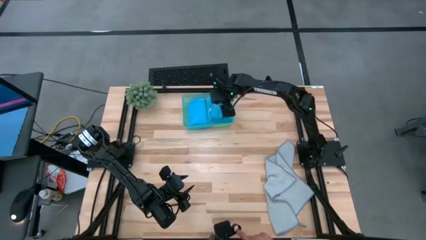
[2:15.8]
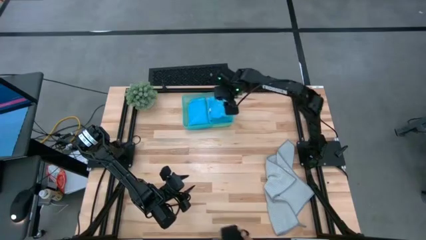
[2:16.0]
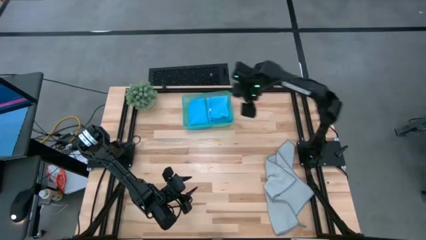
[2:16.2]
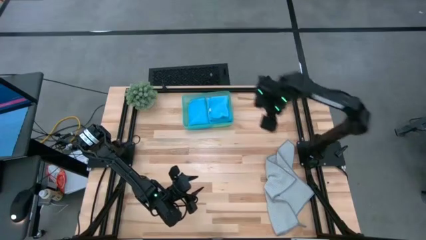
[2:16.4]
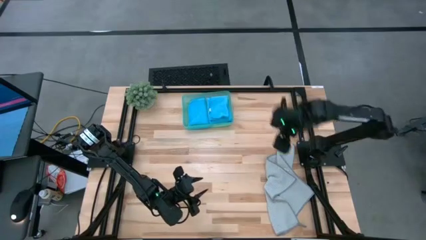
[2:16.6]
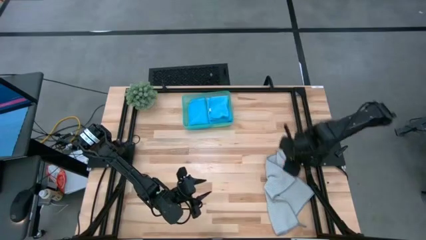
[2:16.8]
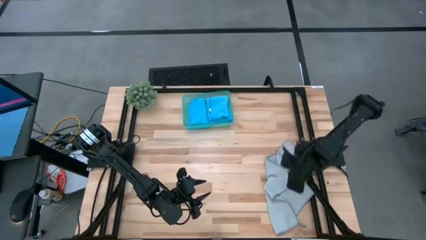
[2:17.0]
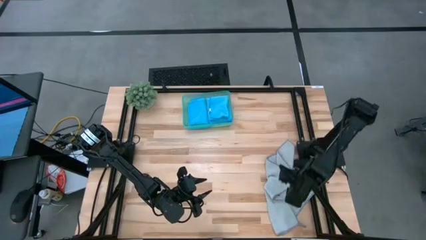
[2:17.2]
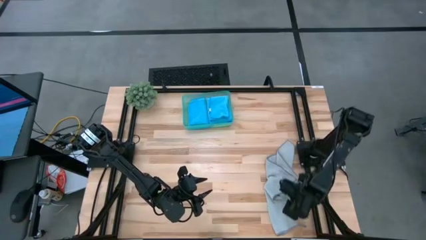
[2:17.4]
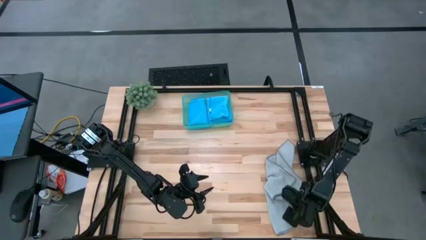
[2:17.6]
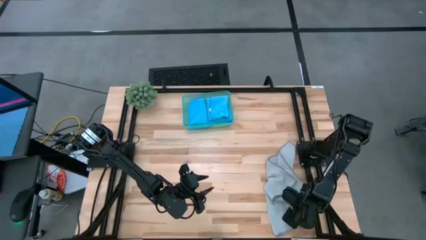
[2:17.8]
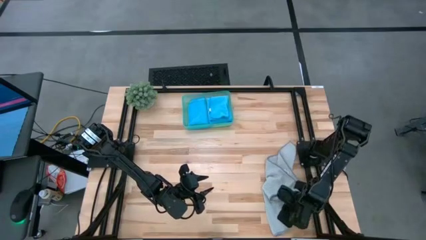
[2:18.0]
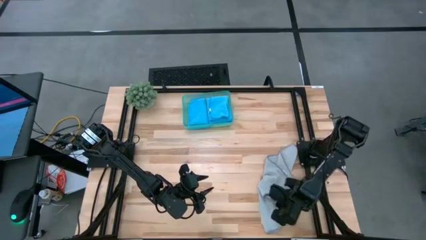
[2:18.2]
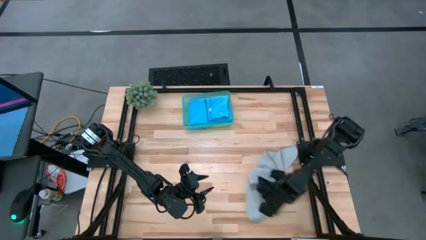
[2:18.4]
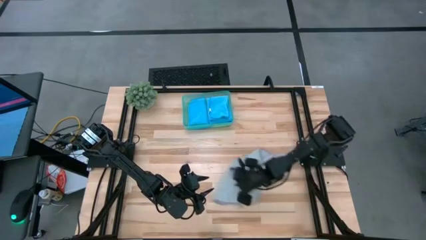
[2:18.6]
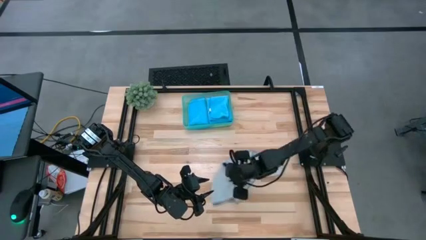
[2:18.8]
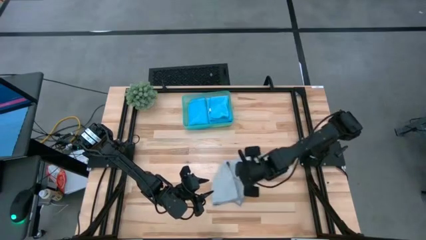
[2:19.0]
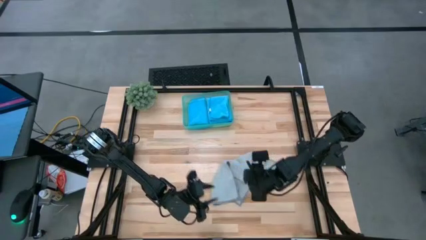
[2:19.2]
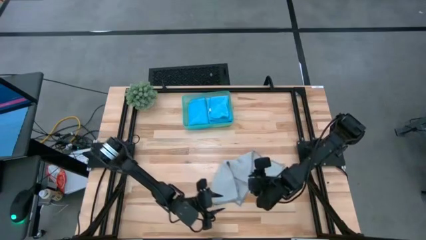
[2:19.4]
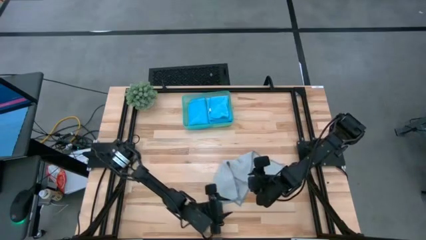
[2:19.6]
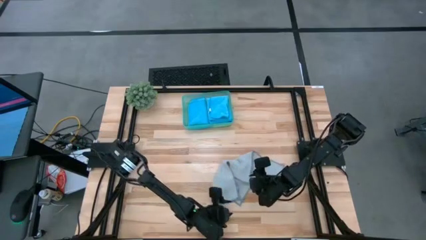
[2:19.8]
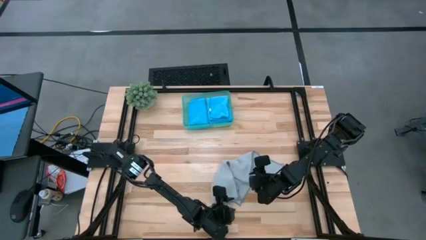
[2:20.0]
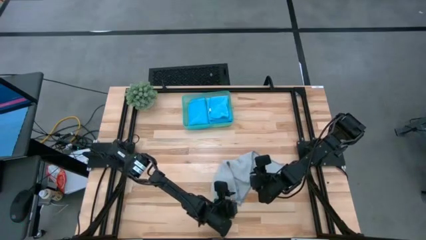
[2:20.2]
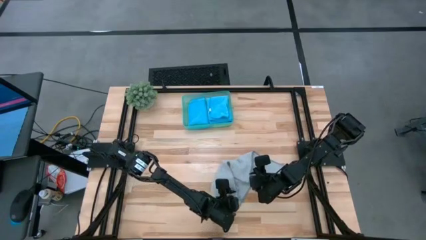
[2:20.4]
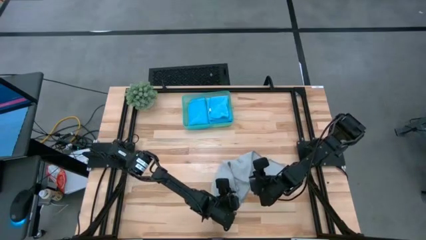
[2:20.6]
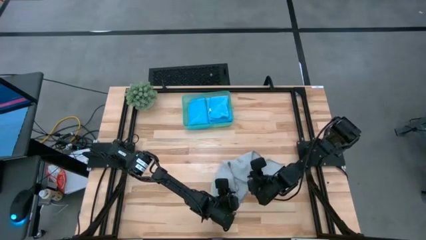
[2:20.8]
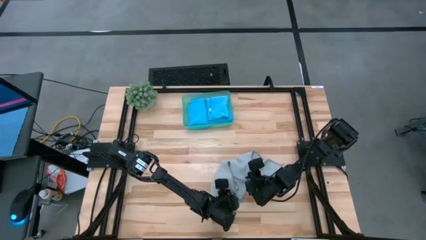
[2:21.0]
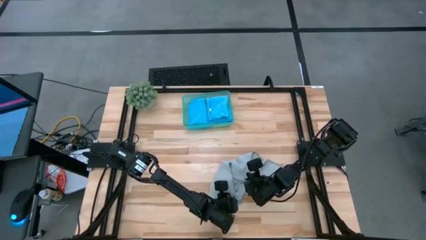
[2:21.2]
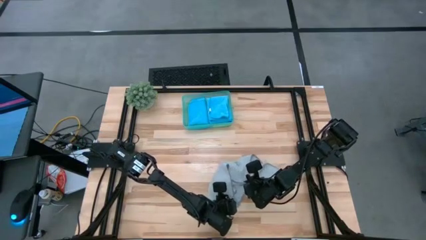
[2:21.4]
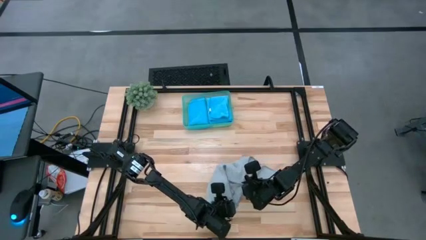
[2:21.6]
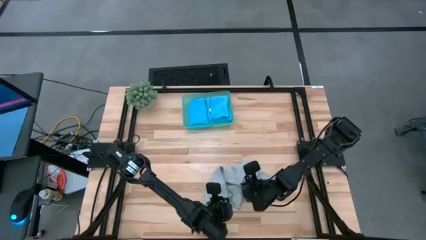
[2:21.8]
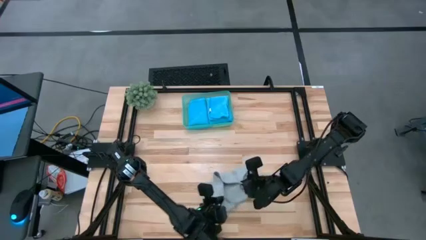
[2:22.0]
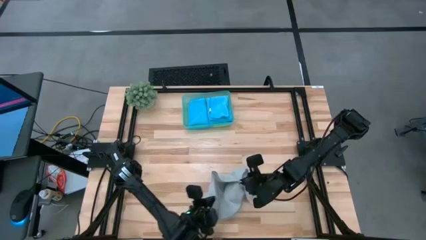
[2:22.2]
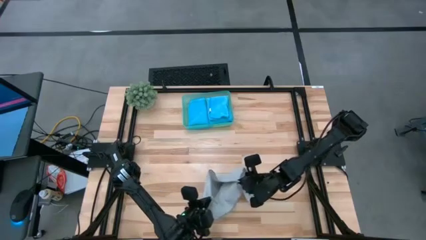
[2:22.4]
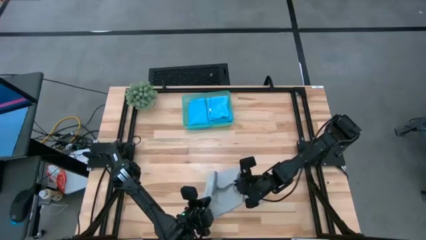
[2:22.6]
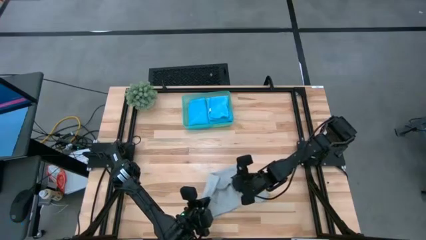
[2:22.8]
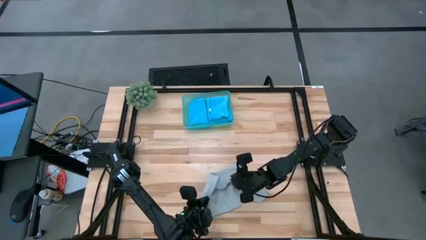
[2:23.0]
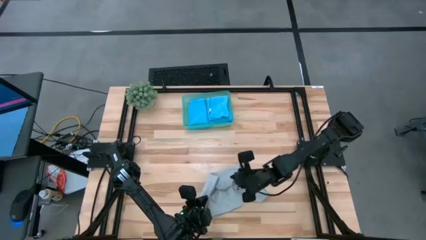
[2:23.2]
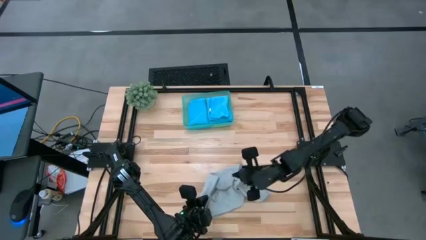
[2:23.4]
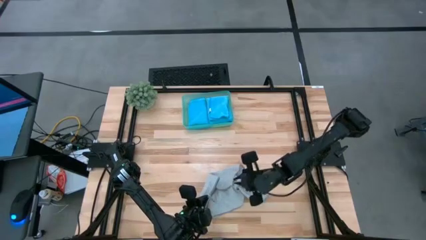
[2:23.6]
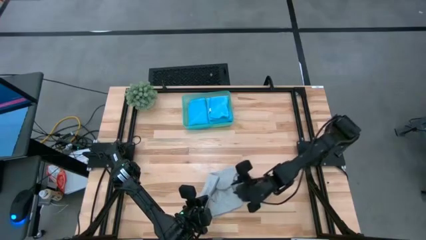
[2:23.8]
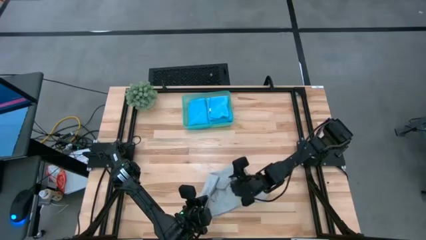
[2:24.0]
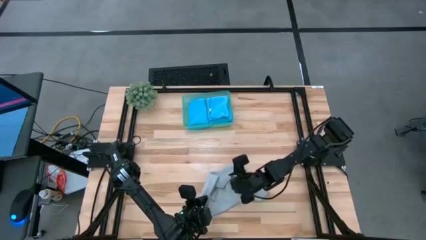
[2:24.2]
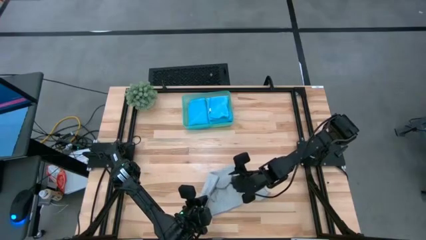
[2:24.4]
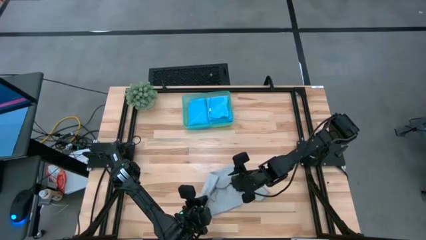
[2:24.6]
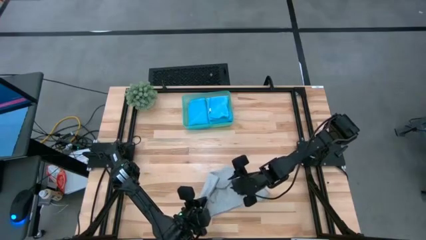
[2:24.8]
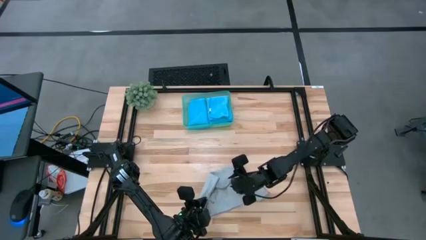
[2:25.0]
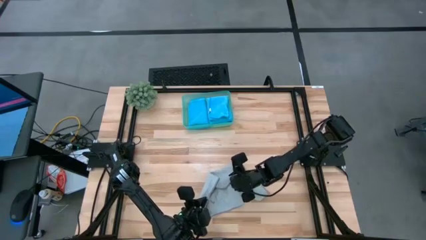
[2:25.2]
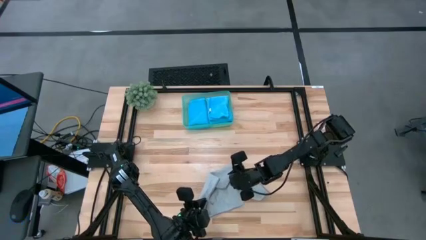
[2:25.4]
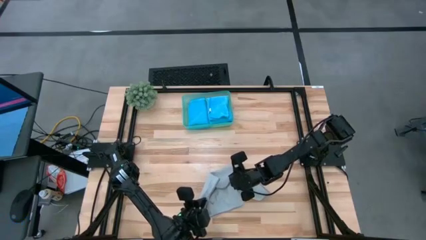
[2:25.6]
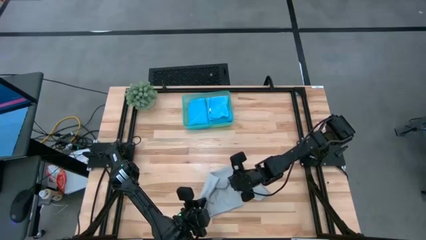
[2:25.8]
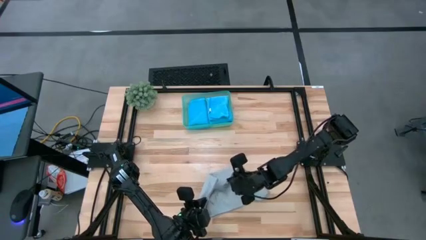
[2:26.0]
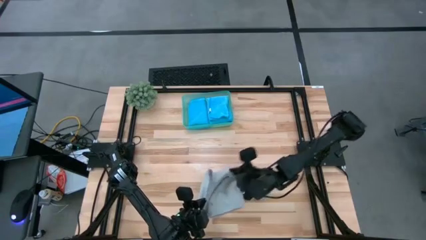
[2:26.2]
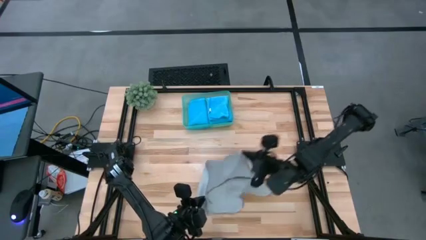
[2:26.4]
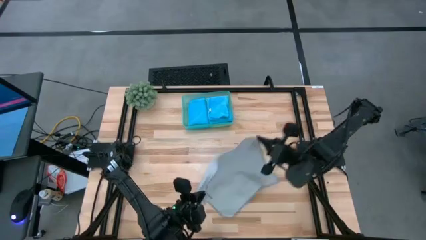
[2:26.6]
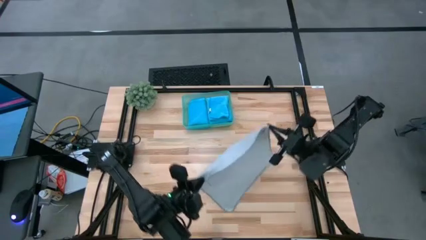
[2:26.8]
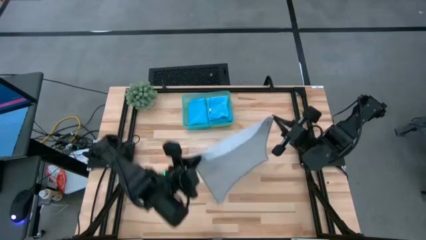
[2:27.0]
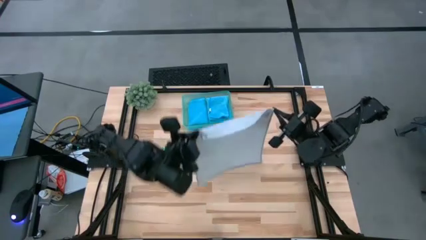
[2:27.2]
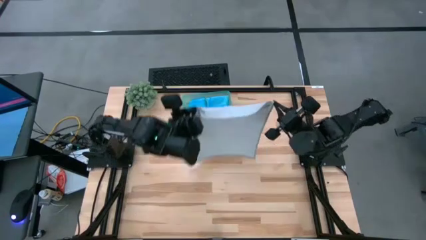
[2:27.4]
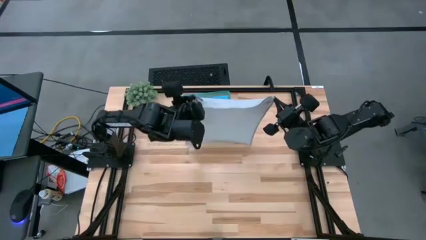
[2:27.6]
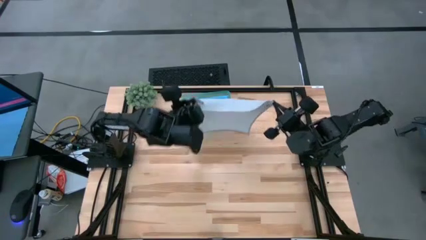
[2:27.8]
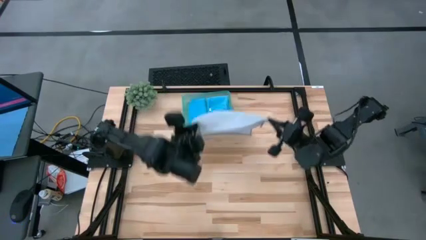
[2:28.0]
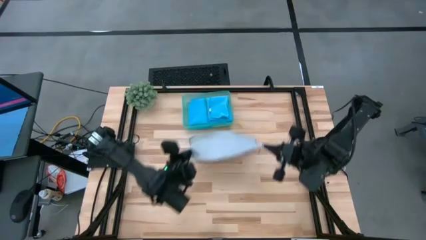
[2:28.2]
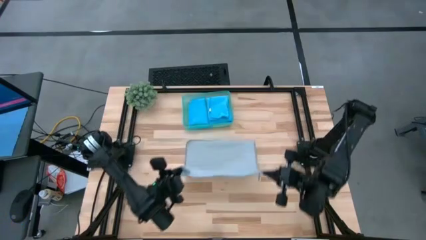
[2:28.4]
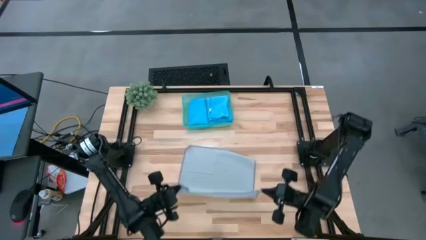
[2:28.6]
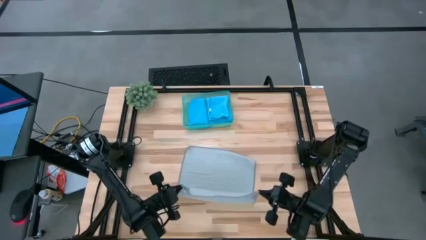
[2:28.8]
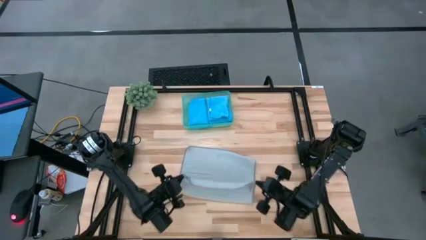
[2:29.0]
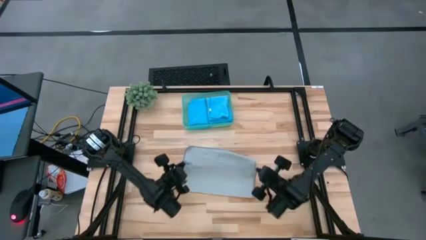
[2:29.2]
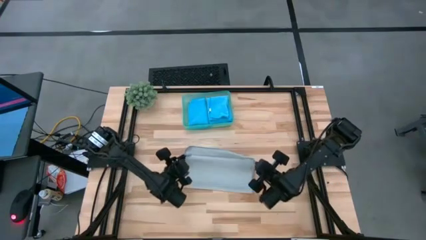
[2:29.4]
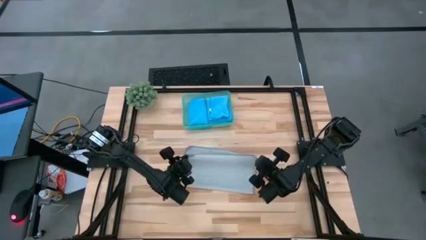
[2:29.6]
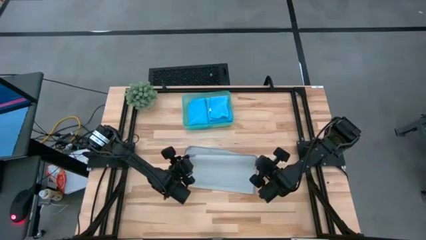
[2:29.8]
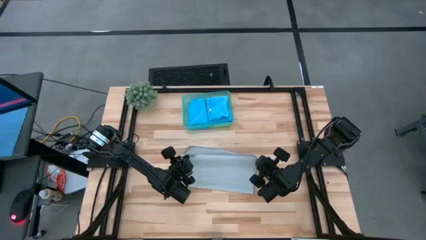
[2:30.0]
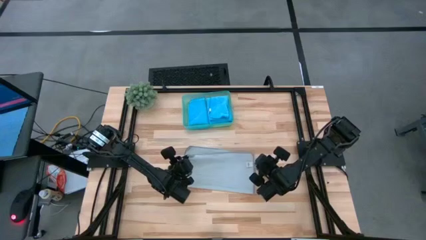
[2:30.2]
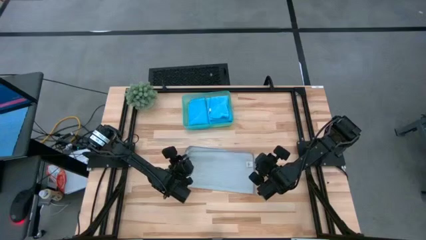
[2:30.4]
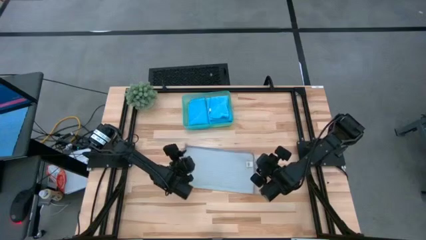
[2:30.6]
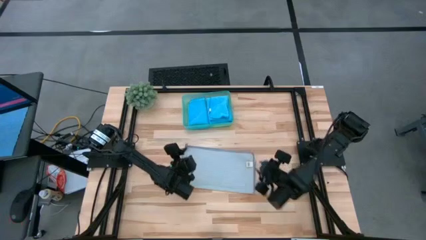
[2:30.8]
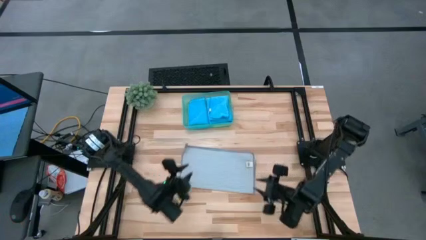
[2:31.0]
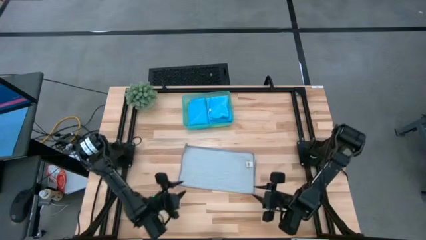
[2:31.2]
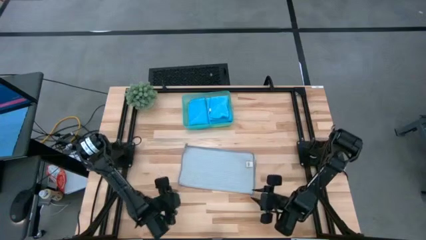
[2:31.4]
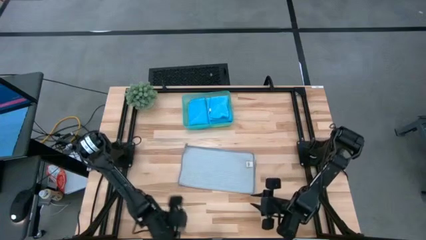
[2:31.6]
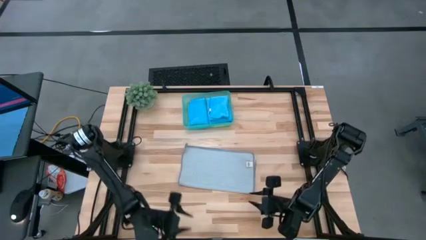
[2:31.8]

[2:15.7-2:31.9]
Task: Fold microfiber towels
Fold the gray microfiber towel
